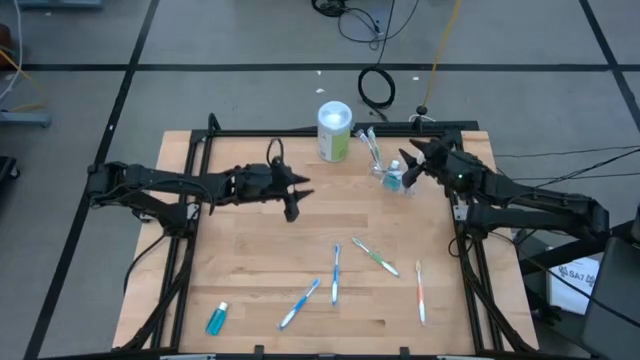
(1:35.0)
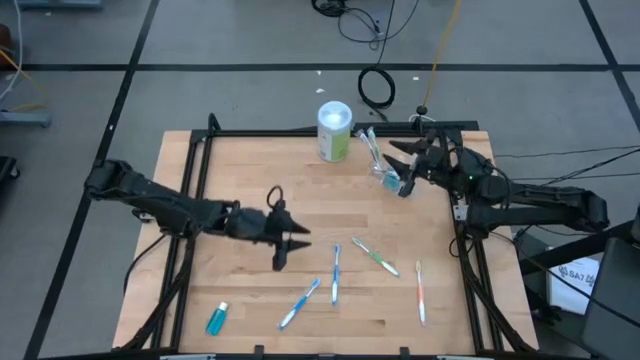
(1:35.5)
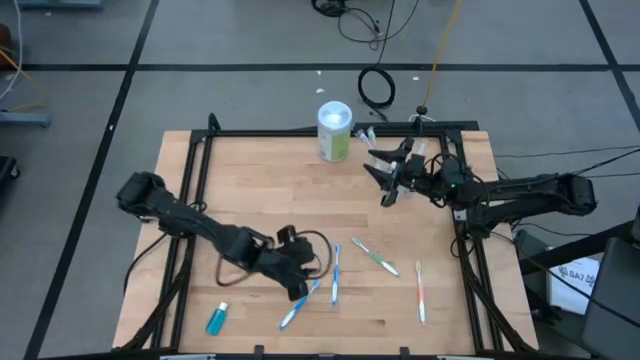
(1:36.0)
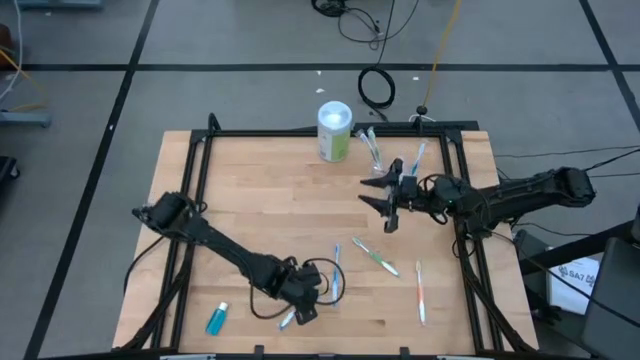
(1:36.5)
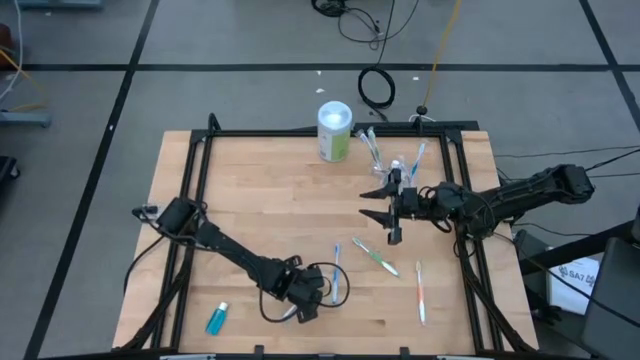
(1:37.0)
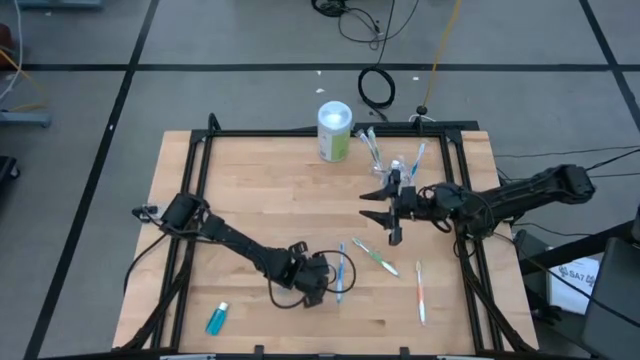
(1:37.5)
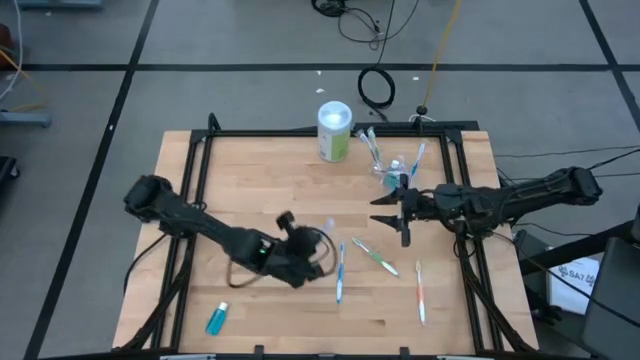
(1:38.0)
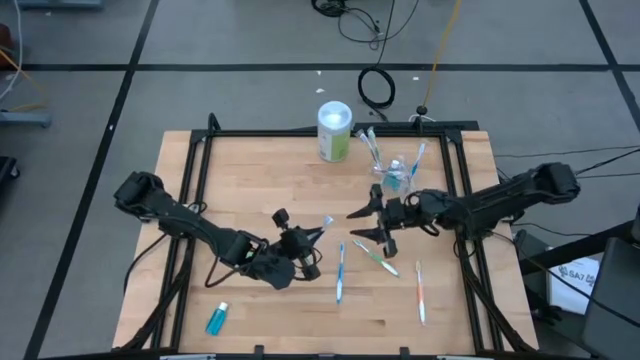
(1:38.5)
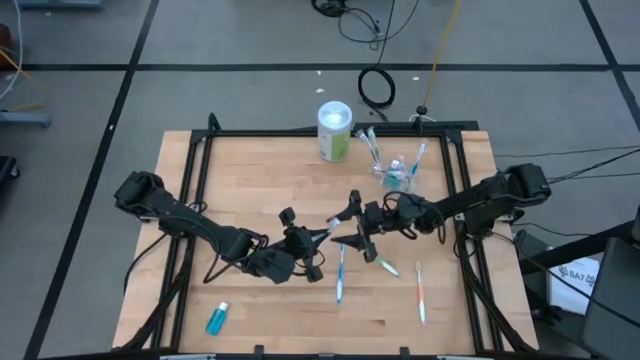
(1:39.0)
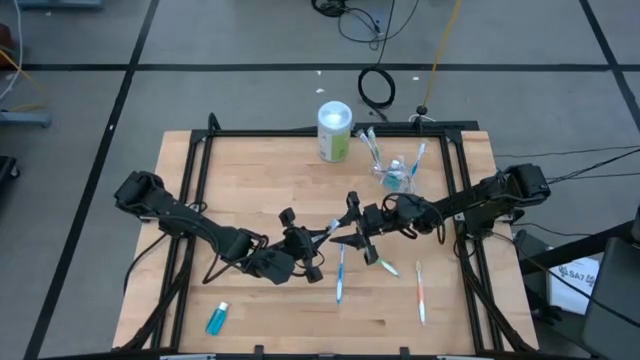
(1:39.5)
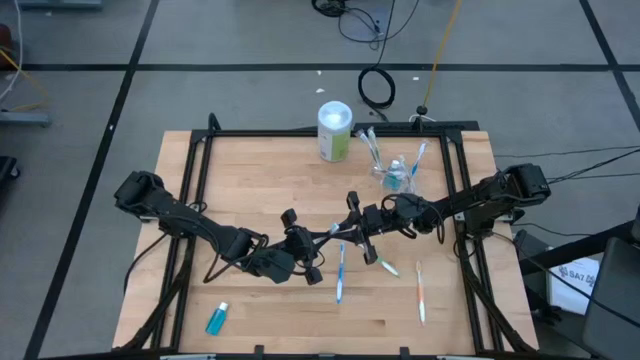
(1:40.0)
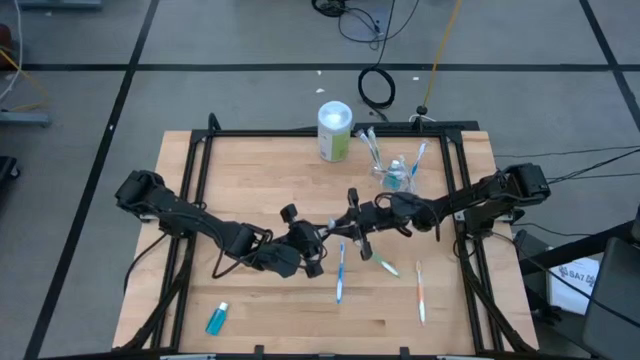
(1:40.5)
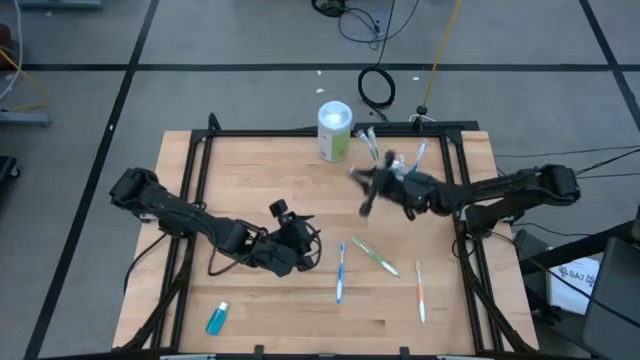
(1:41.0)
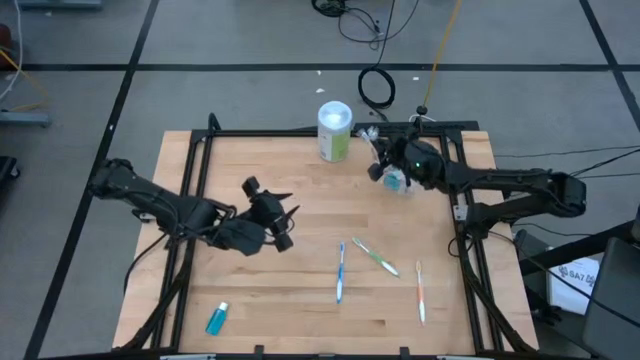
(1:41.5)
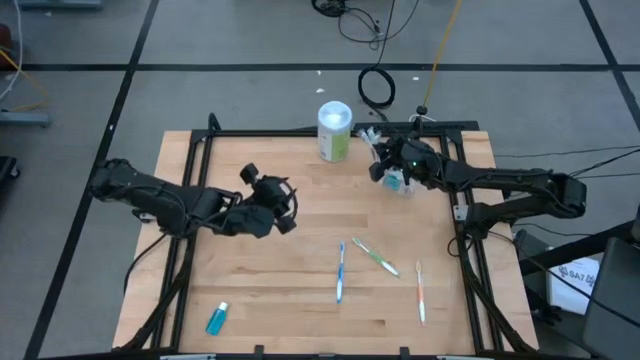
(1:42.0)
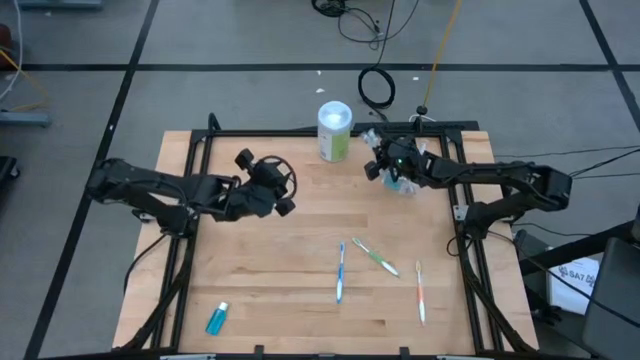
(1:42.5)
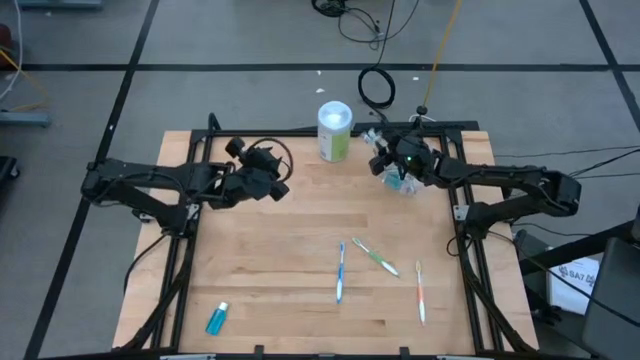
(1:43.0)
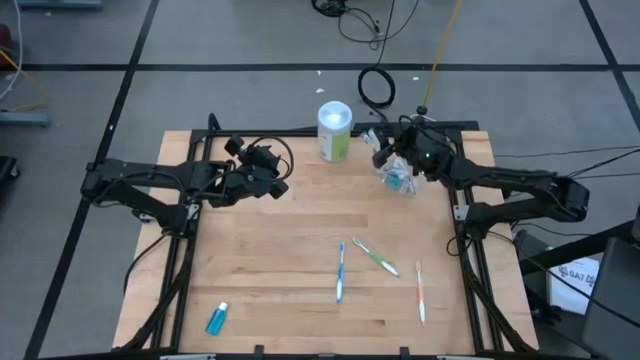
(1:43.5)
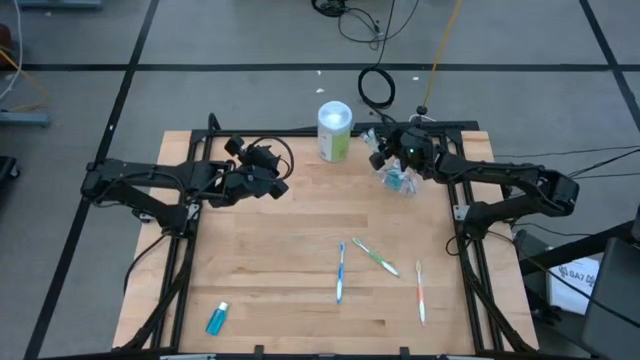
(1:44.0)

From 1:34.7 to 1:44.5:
Task: Pick & Place toothbrushing station
Put the left blue toothbrush into the transparent organizer

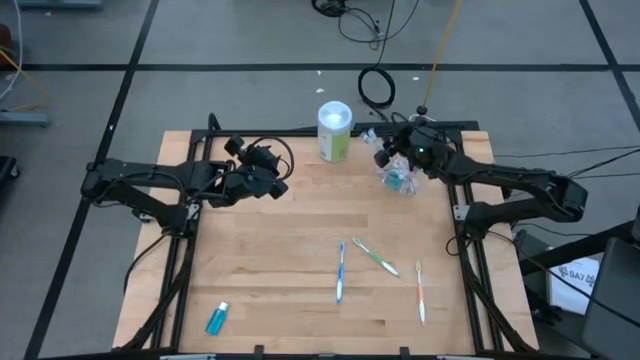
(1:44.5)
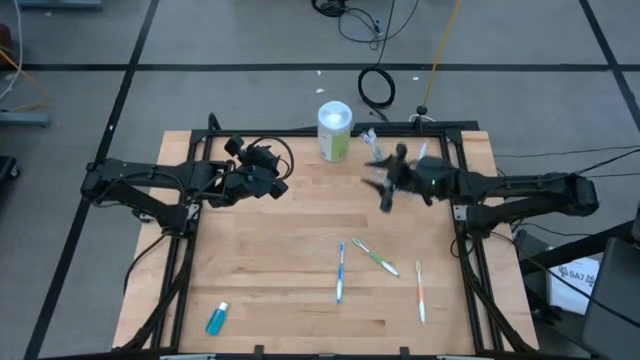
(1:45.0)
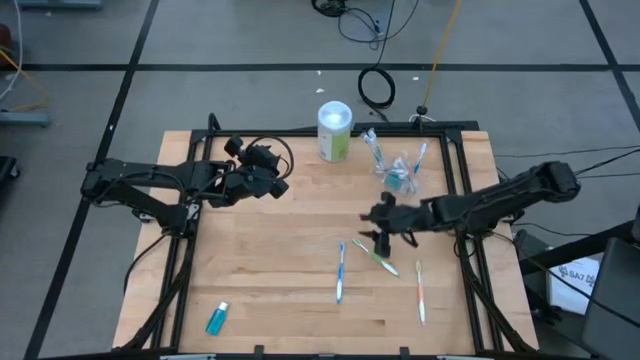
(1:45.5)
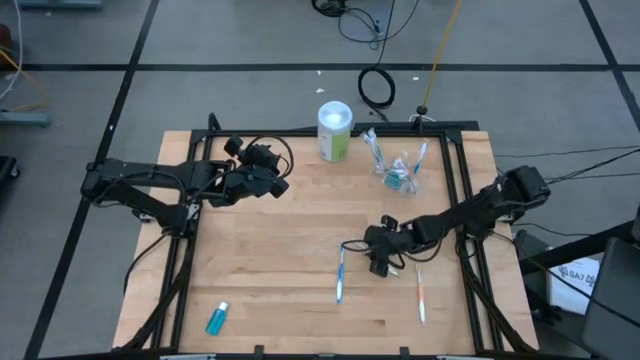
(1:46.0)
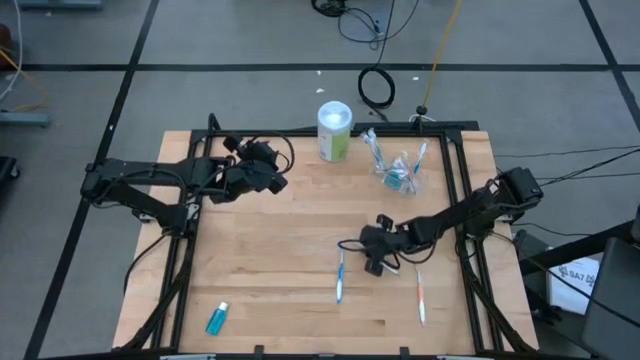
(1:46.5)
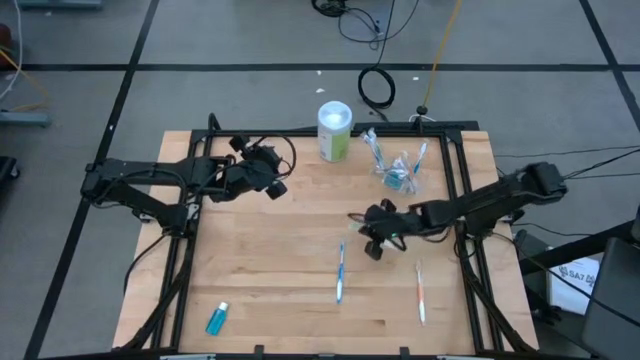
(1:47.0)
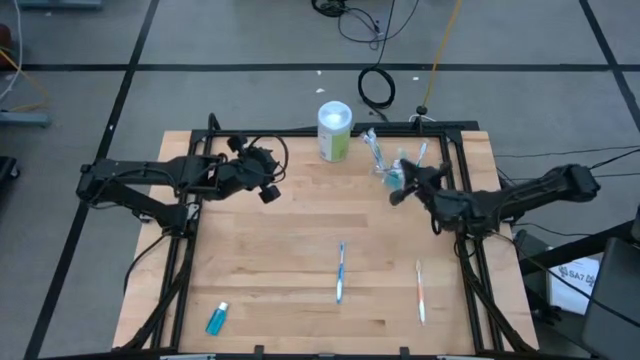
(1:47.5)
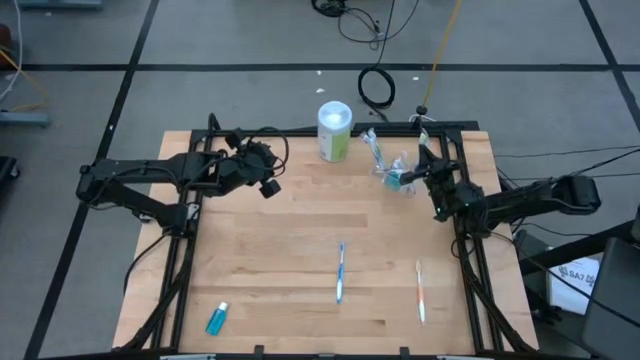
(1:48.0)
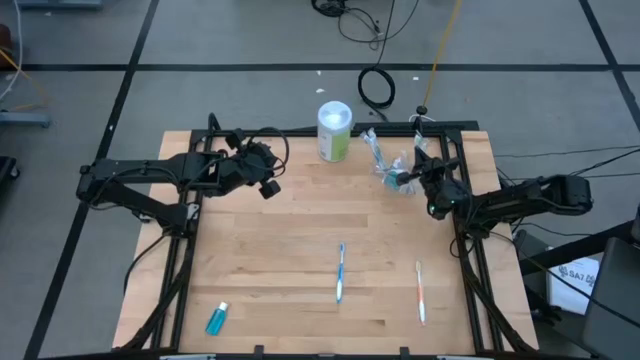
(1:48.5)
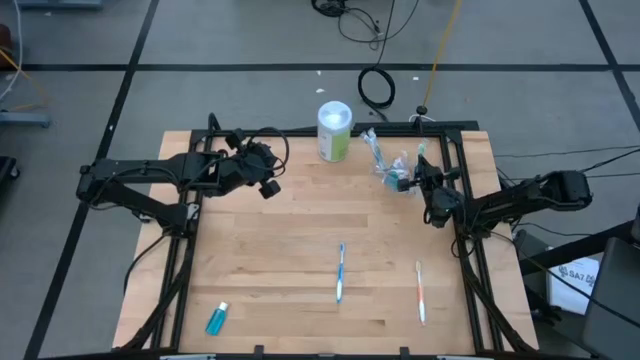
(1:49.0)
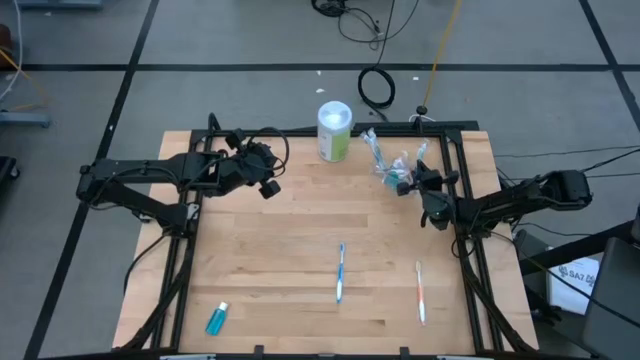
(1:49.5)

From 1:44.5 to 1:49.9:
Put the green toothbrush into the transparent organizer

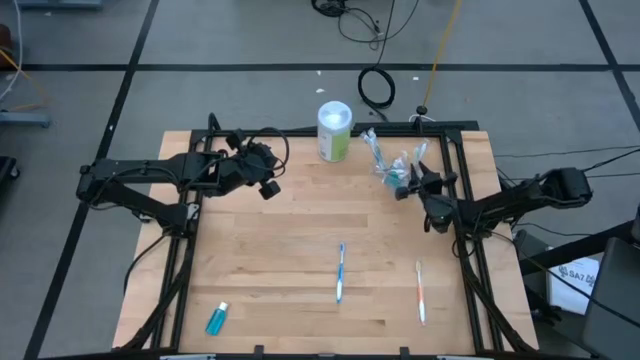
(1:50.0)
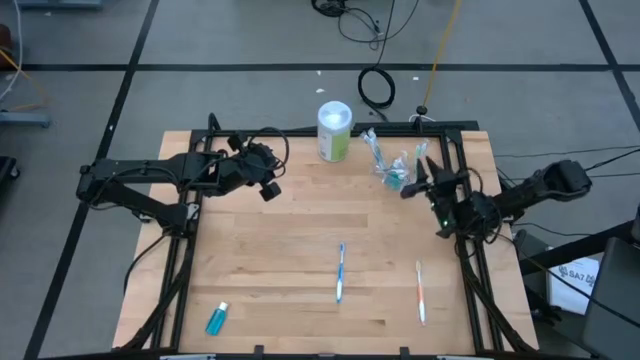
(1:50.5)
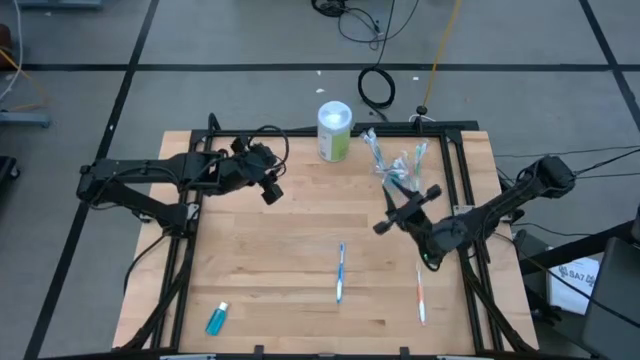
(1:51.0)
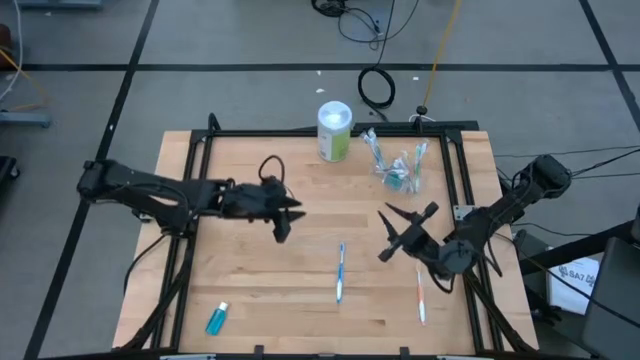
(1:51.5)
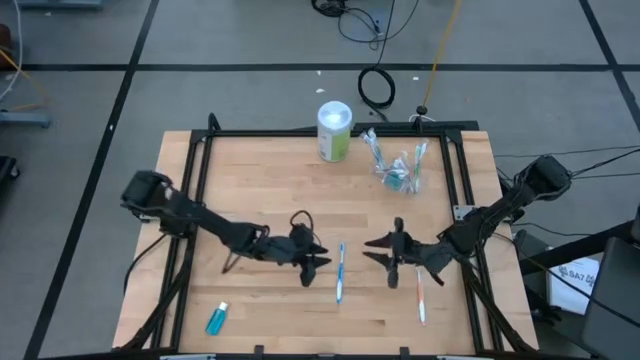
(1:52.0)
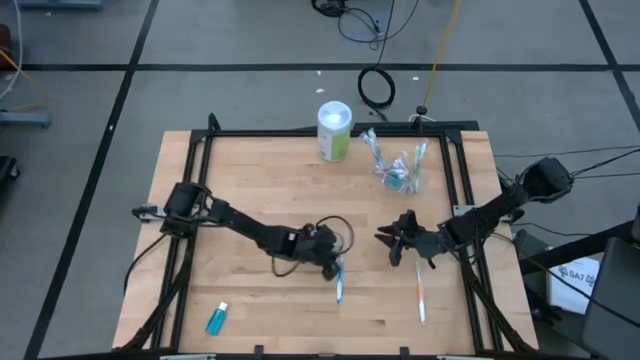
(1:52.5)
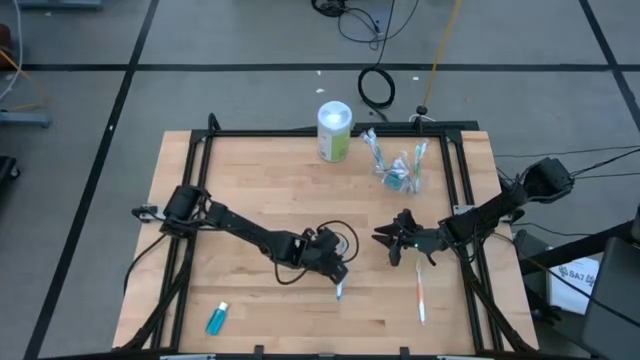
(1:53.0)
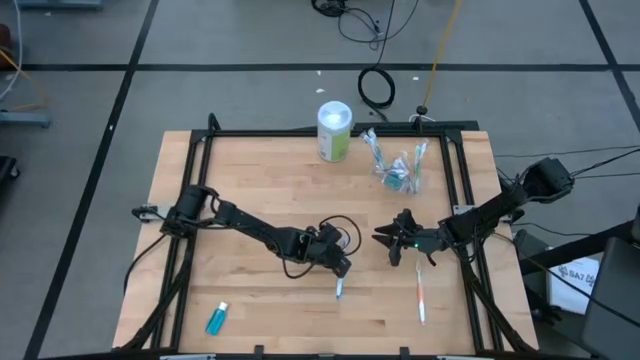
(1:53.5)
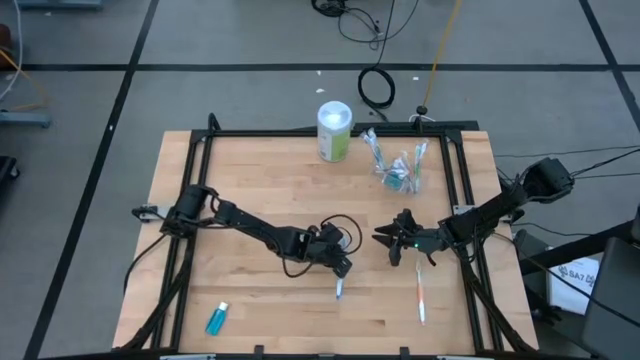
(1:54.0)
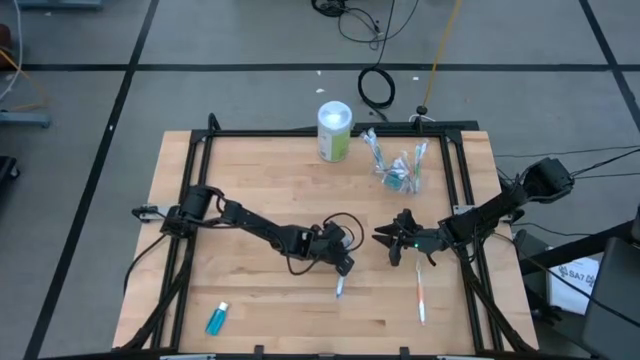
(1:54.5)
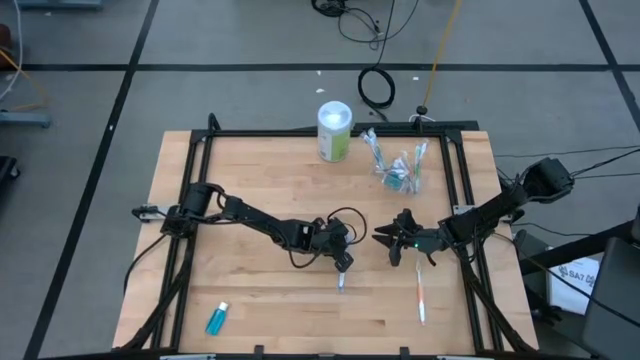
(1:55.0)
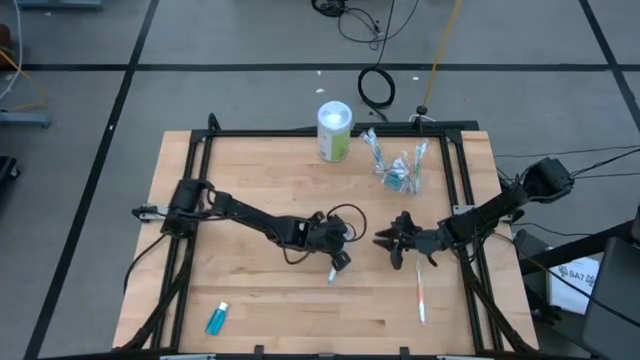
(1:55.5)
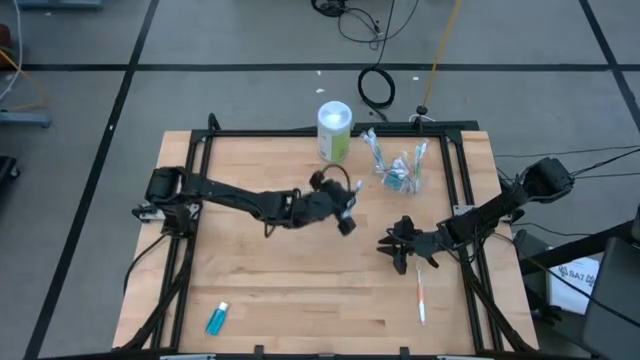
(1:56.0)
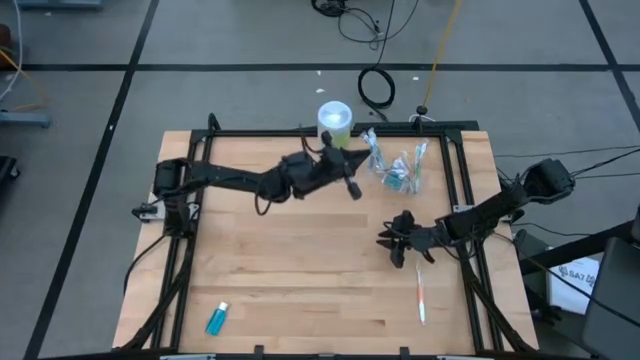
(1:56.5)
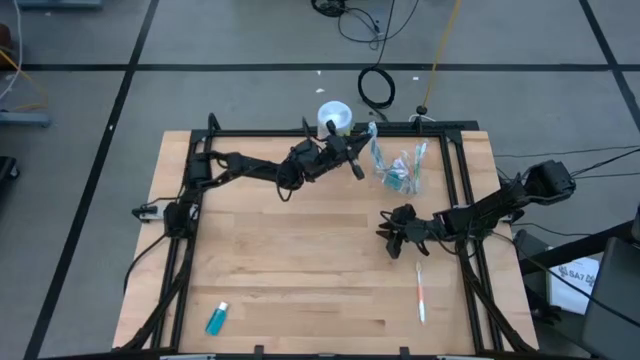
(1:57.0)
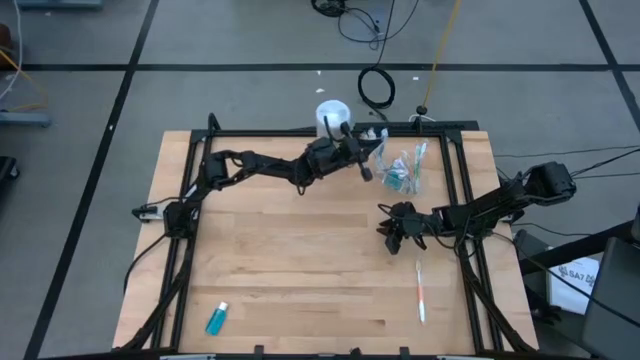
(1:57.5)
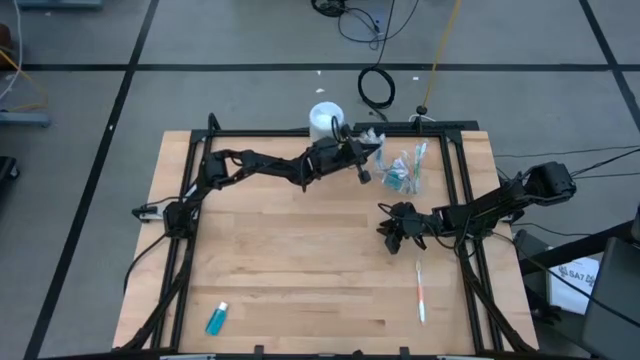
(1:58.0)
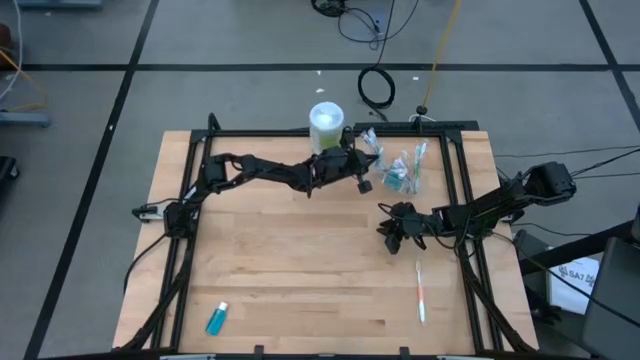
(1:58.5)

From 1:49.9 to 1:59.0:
Put the blue toothbrush into the transparent organizer
